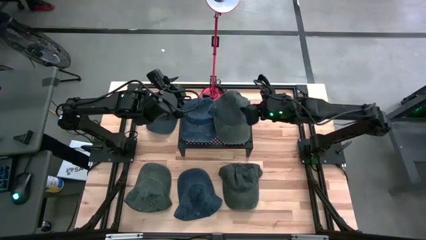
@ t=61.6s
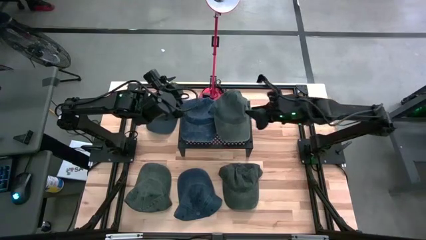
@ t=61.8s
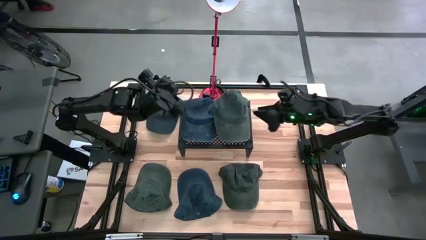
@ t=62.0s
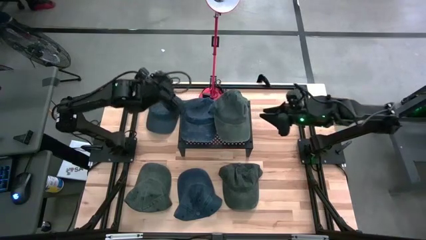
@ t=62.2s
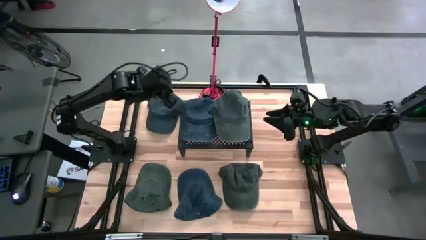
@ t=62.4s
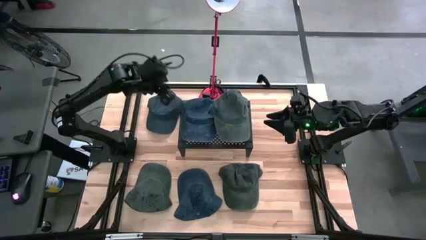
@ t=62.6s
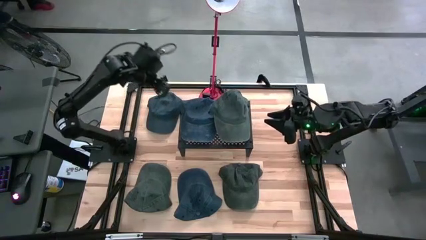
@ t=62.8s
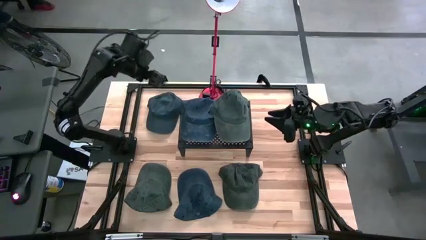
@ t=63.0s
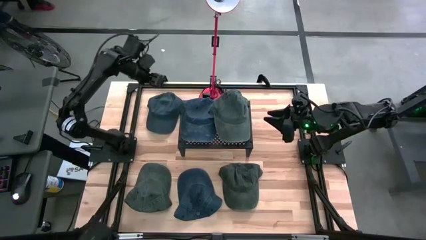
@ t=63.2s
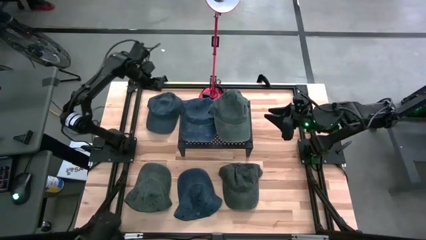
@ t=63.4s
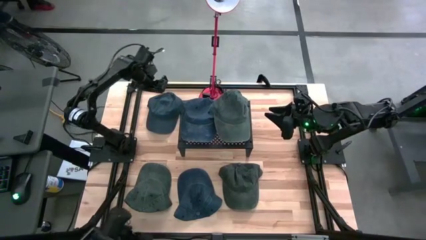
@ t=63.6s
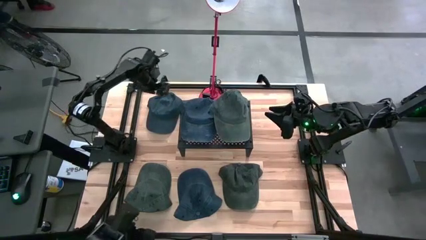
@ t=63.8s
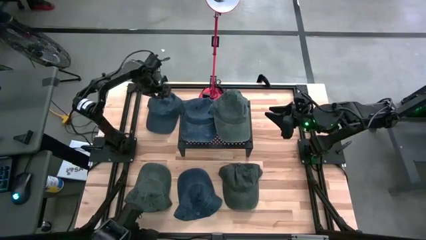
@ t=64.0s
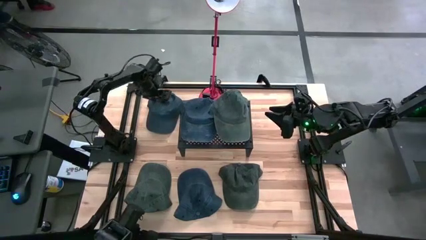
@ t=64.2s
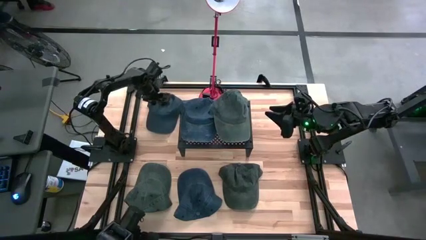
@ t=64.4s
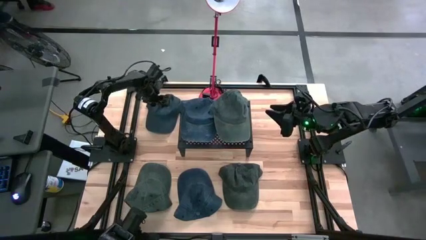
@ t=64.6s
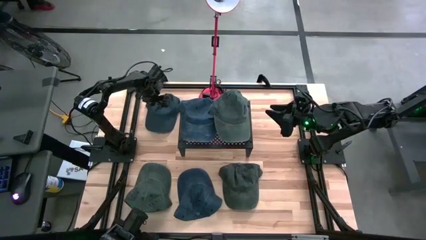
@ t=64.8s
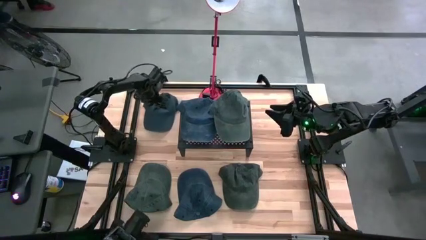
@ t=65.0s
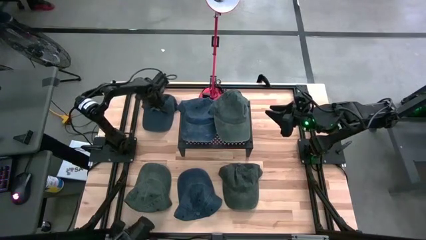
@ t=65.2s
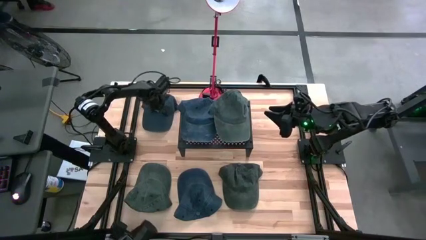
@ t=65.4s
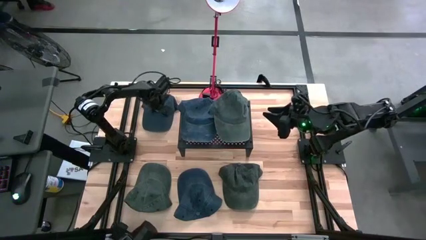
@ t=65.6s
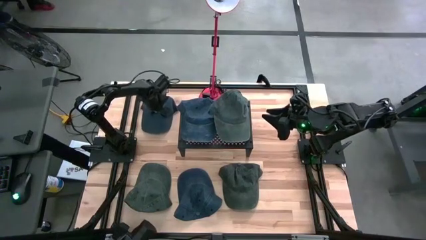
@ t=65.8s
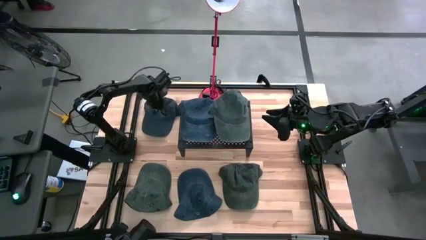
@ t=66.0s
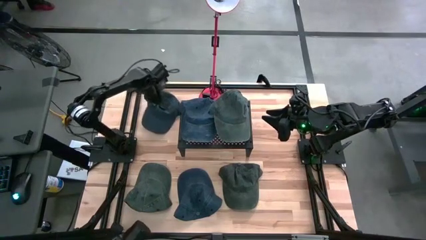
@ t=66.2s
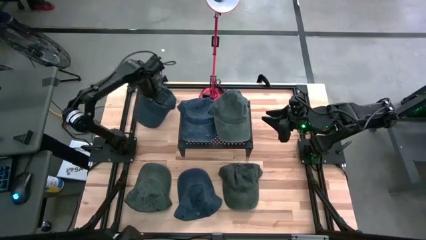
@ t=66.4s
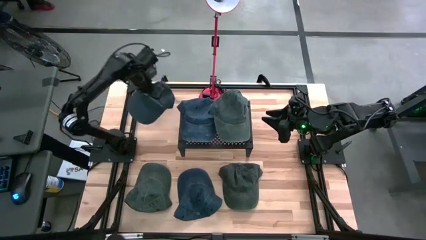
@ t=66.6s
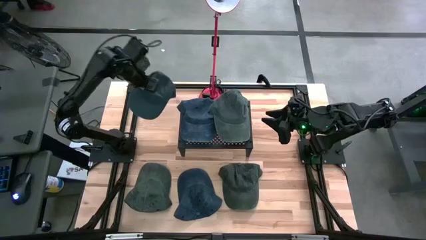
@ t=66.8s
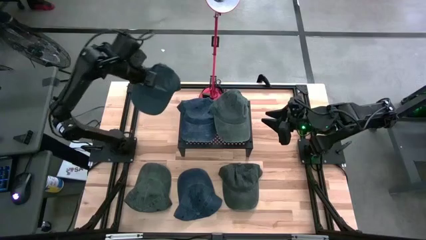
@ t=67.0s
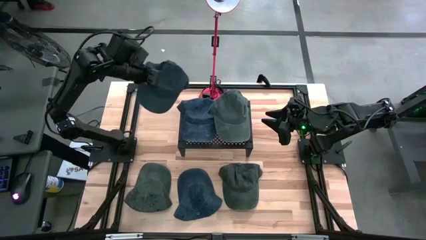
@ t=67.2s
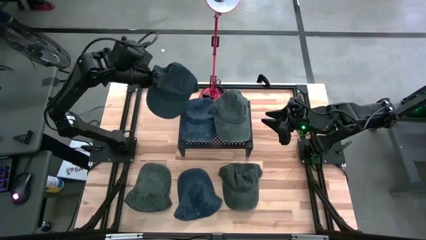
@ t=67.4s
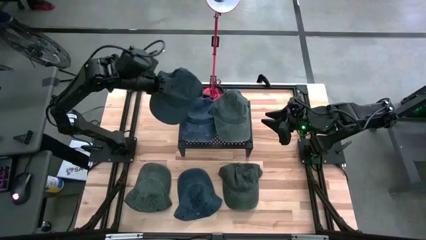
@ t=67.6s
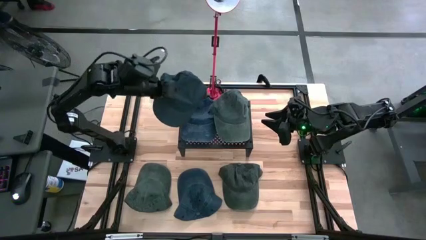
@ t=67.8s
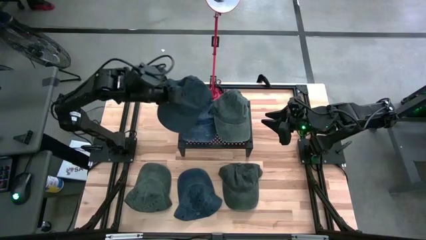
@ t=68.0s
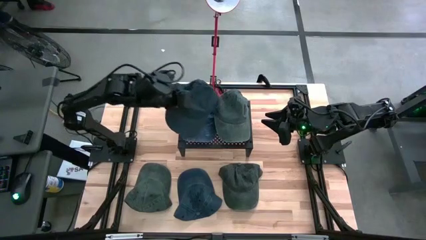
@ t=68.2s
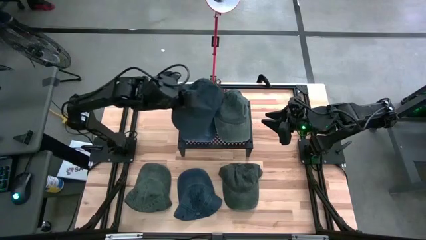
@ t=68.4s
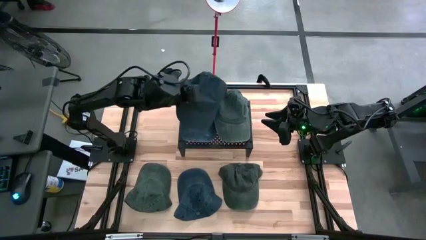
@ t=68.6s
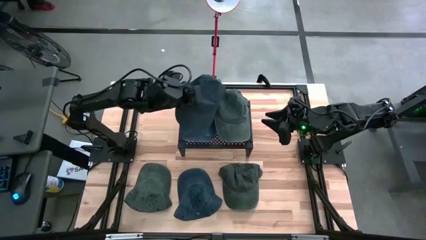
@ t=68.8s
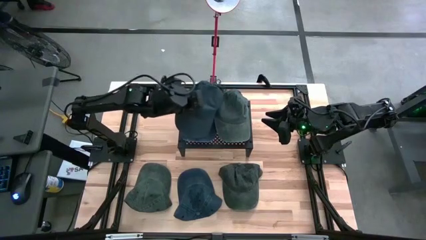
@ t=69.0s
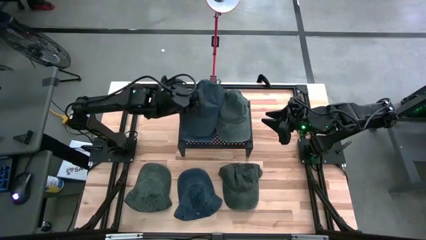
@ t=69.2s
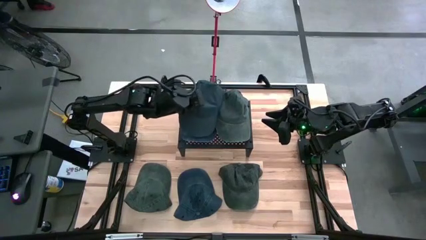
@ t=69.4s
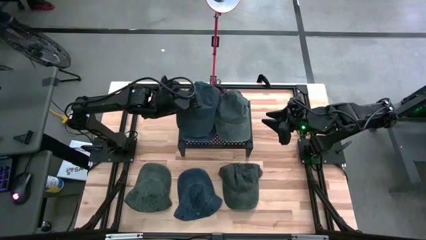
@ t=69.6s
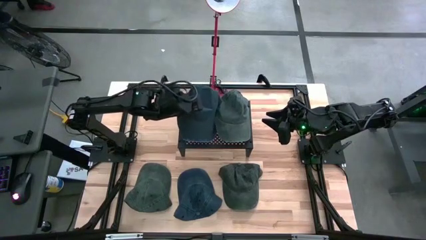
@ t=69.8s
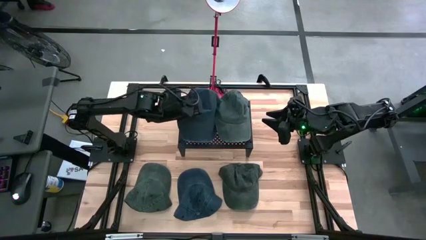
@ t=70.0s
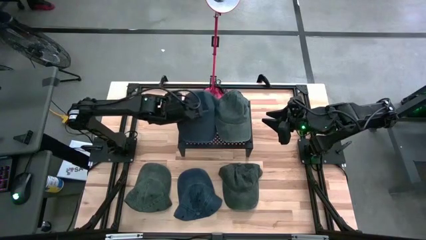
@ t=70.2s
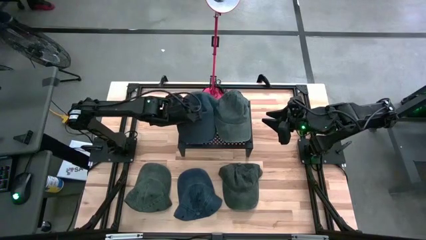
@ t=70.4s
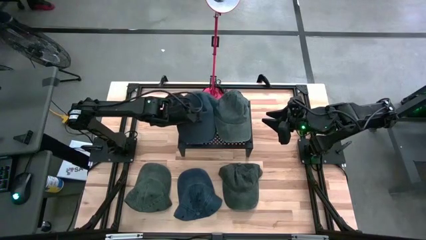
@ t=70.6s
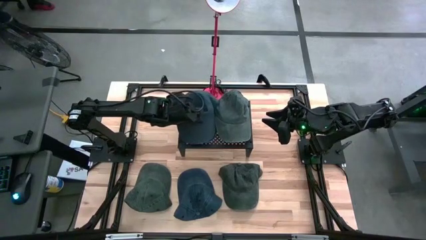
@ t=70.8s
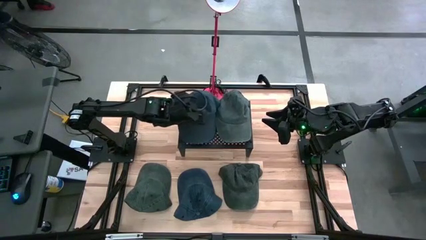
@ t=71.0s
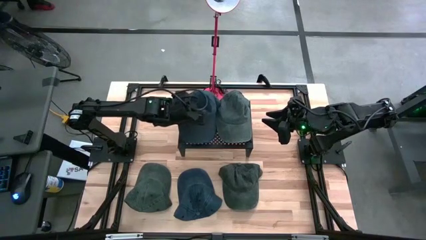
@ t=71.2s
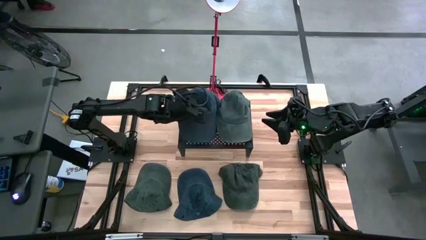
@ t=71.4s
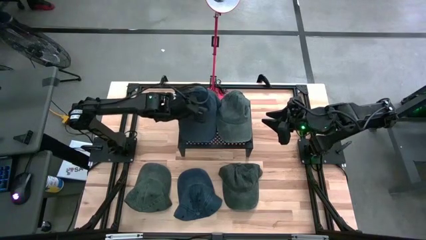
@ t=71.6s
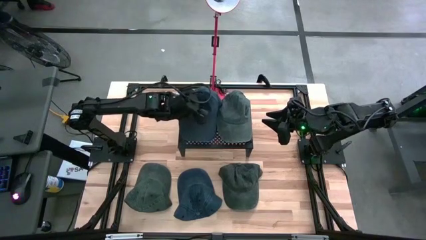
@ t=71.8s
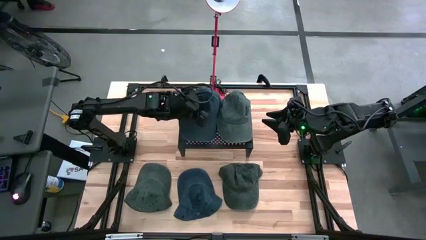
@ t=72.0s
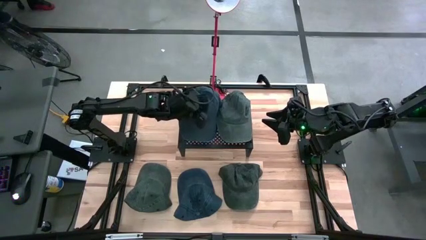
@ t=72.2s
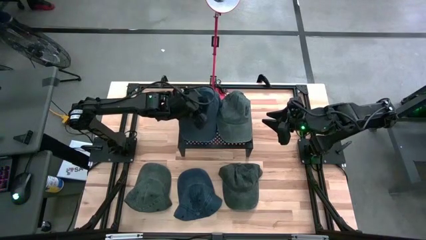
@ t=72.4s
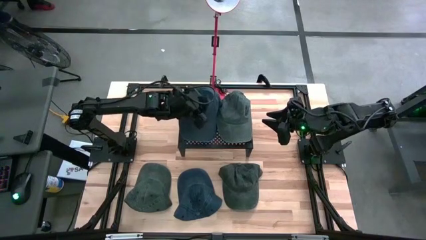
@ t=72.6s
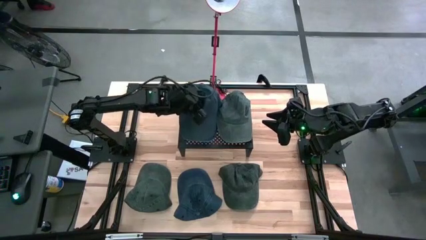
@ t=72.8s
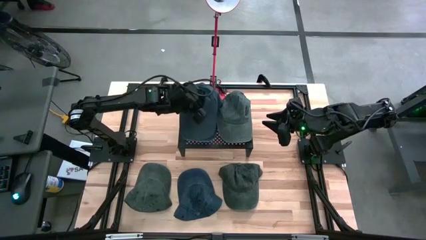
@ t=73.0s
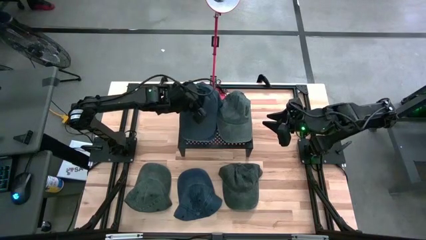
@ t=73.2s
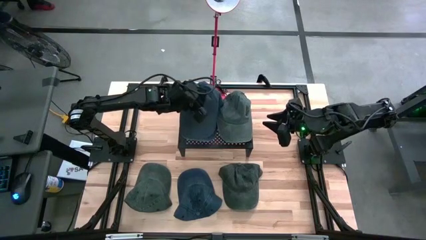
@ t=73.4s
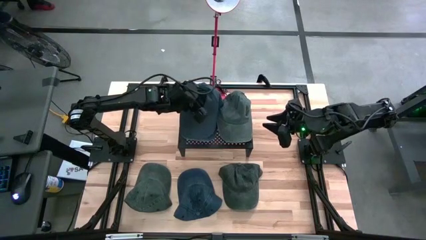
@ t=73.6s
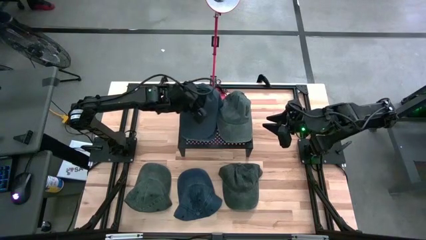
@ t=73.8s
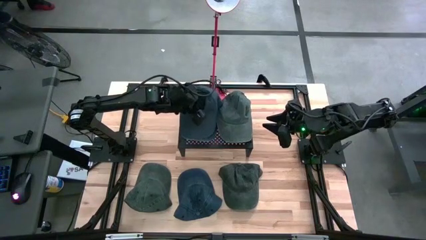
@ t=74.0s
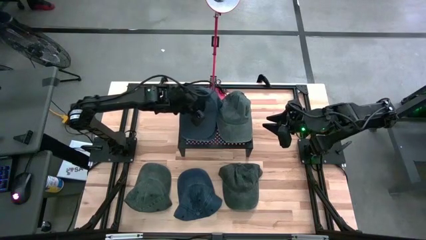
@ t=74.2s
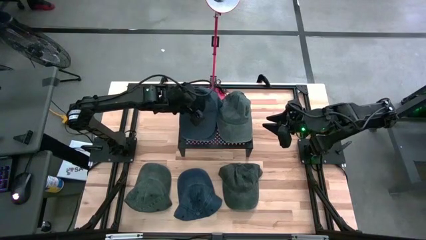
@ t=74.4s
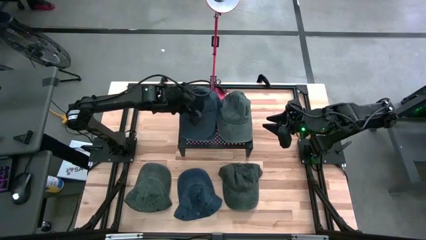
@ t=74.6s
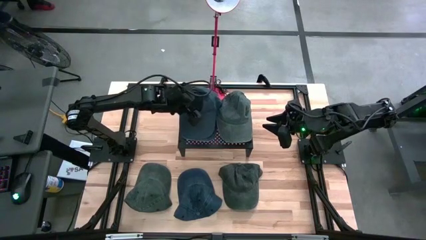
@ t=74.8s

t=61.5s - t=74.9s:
Task: Pick & Place hat
Stack the top blue cap on top of the blue cap on the shelf

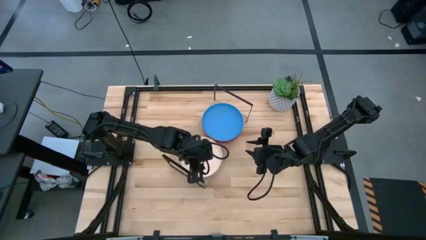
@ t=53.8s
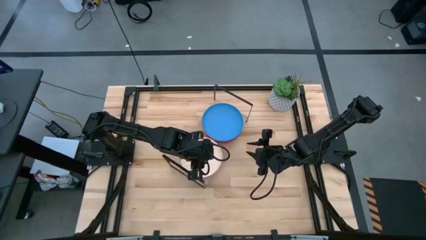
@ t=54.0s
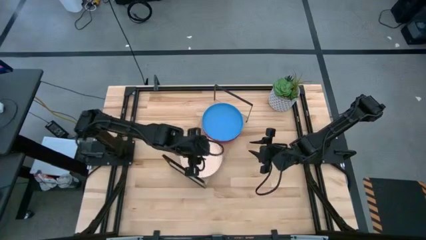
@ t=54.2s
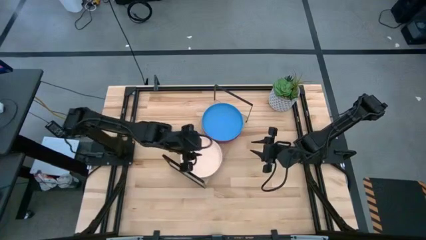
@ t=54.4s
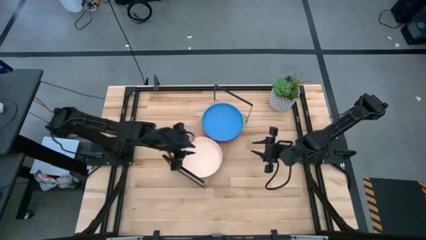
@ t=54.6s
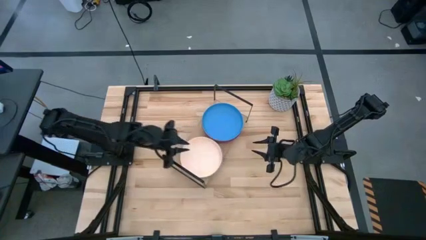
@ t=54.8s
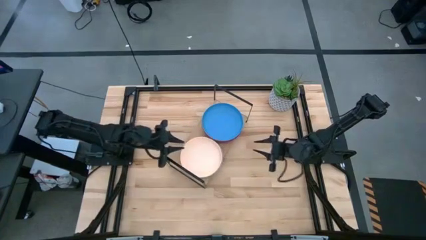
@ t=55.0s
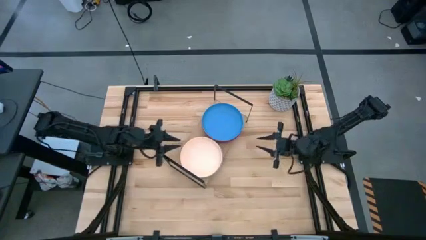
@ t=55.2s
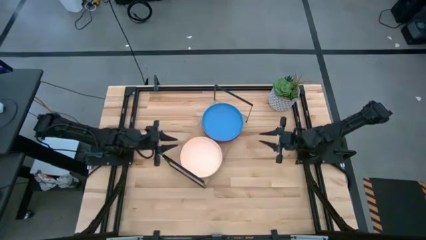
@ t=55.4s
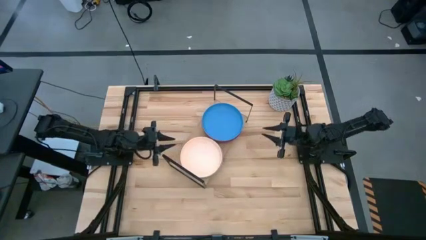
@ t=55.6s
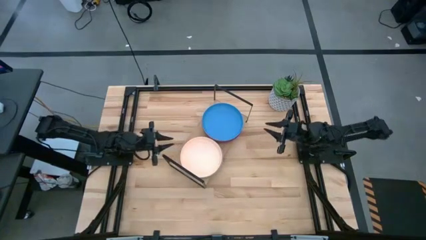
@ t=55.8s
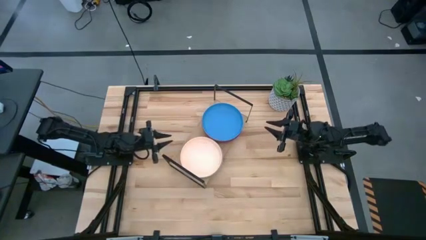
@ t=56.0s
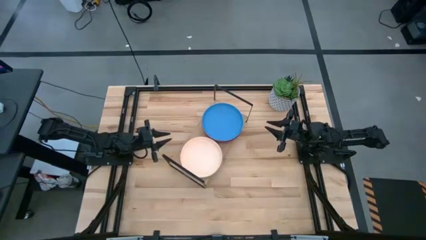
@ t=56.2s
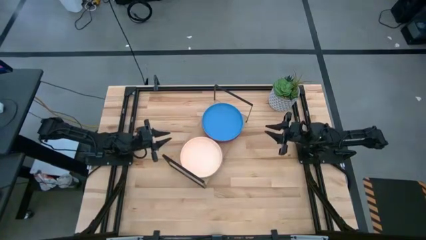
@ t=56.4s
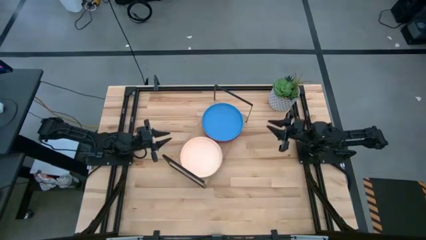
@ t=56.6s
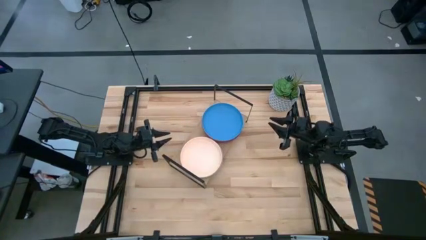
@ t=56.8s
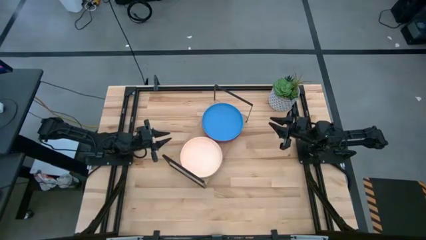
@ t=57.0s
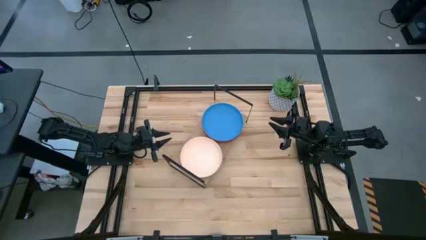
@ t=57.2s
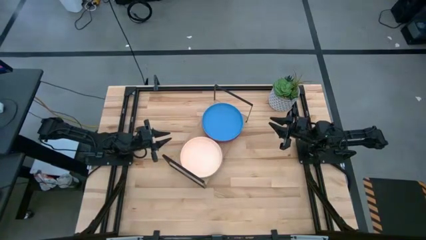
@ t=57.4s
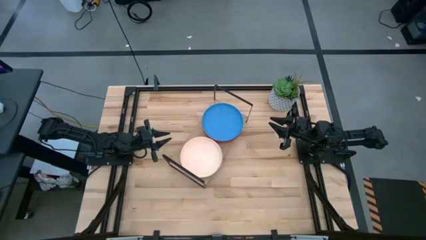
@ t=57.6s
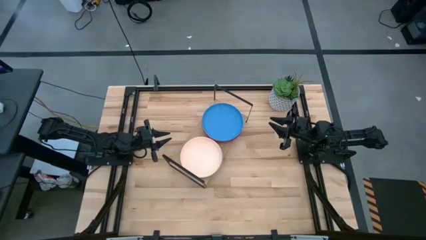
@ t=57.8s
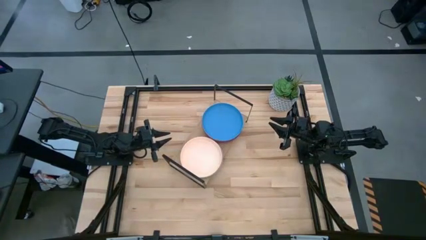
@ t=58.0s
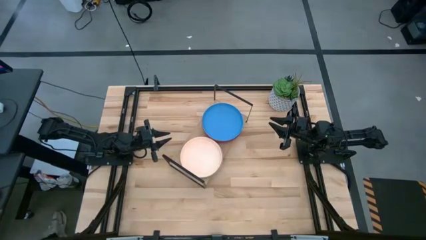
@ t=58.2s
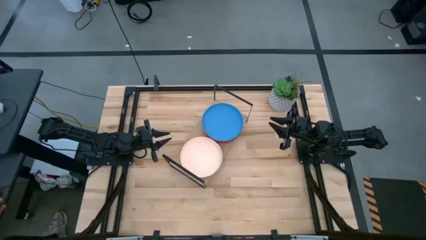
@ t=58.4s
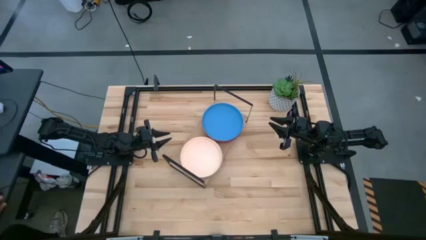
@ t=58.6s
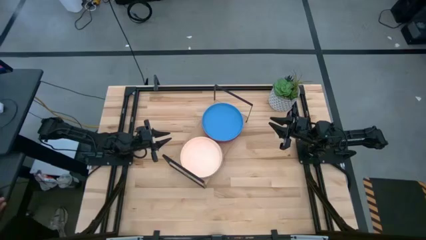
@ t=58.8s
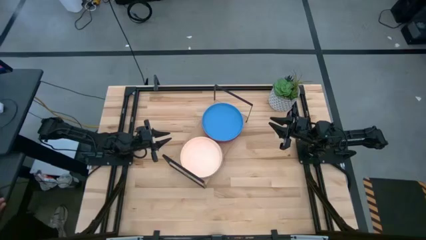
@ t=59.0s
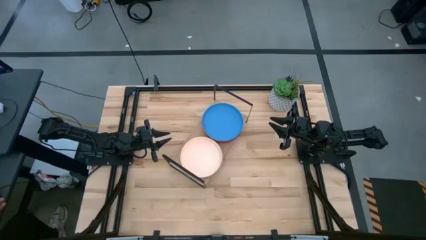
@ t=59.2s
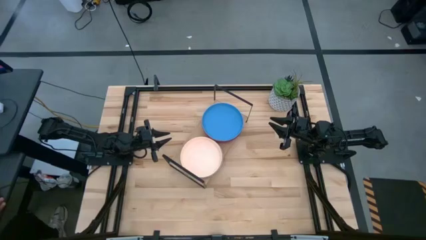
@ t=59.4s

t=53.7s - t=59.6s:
Task: Place and stack plates onto a shelf
Return to Home Position
